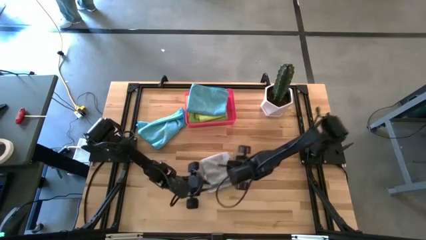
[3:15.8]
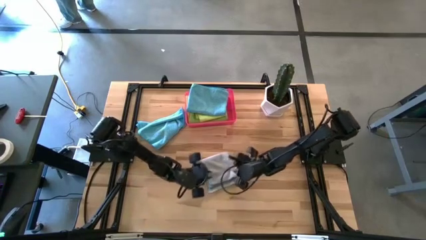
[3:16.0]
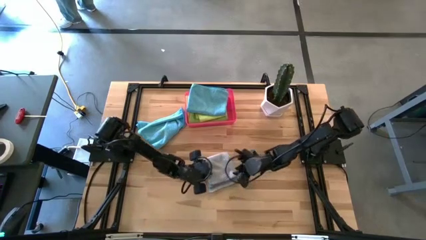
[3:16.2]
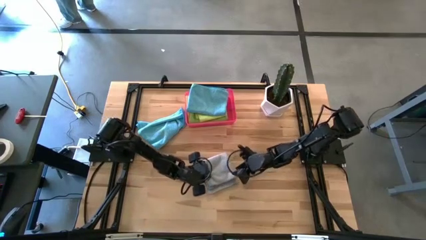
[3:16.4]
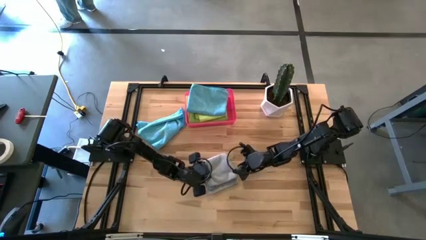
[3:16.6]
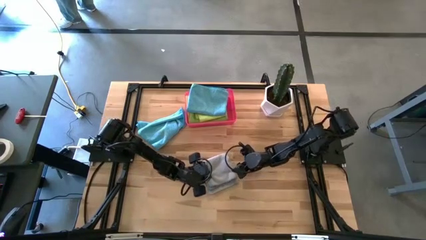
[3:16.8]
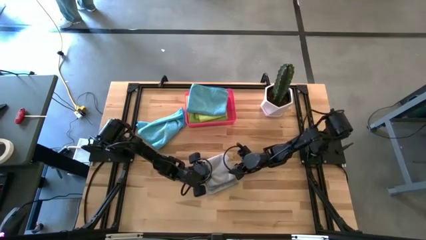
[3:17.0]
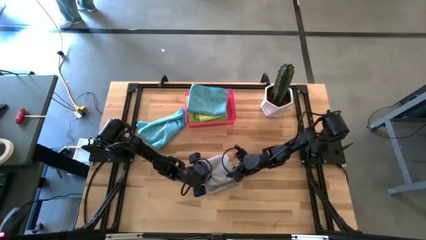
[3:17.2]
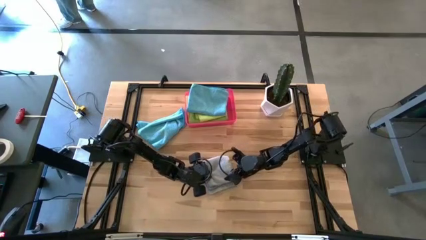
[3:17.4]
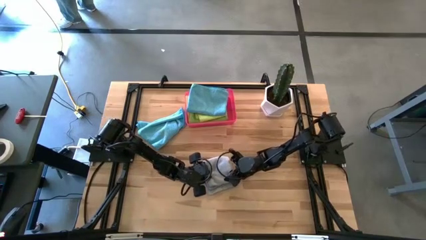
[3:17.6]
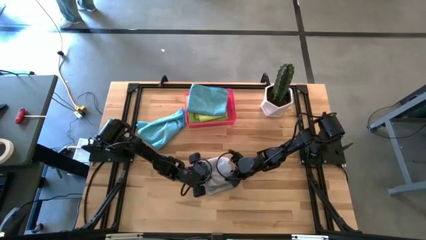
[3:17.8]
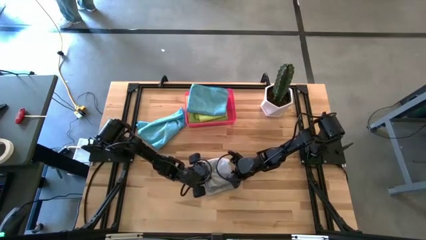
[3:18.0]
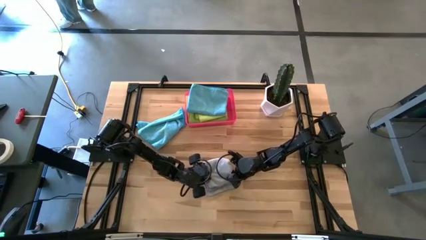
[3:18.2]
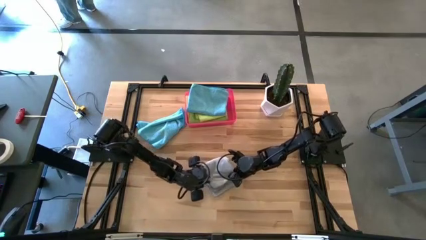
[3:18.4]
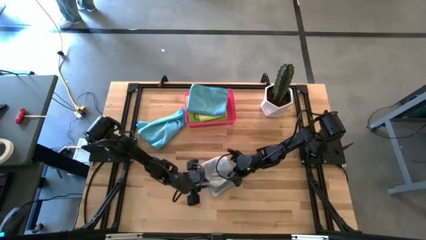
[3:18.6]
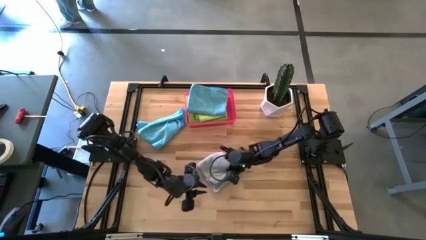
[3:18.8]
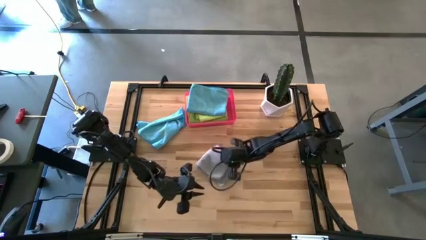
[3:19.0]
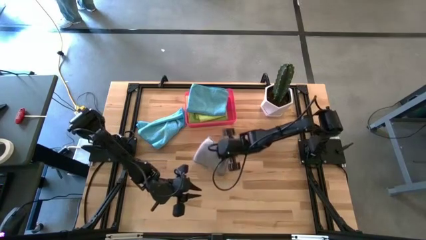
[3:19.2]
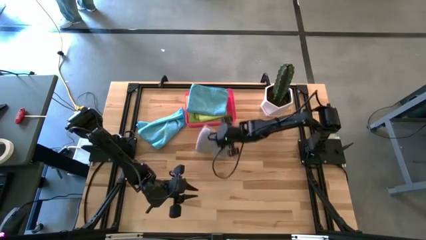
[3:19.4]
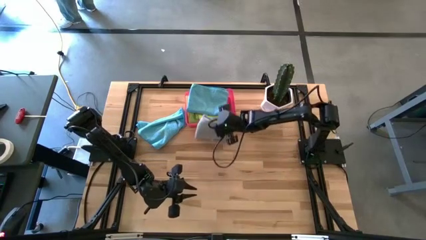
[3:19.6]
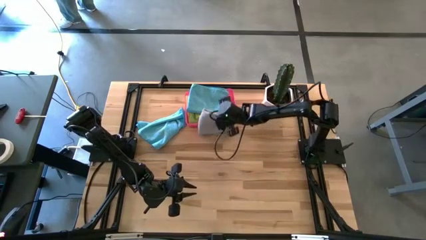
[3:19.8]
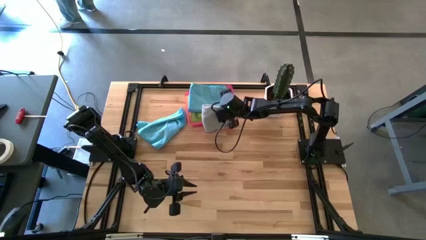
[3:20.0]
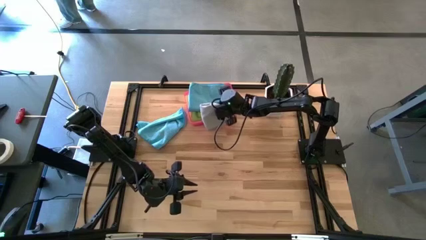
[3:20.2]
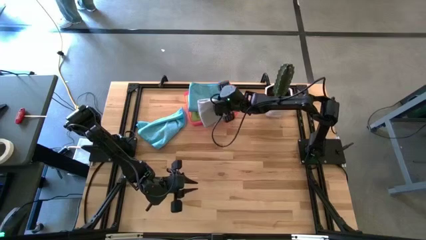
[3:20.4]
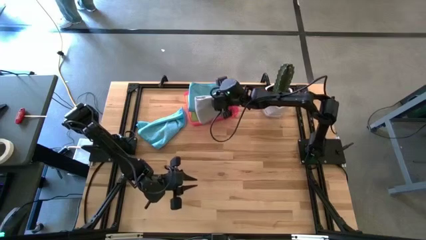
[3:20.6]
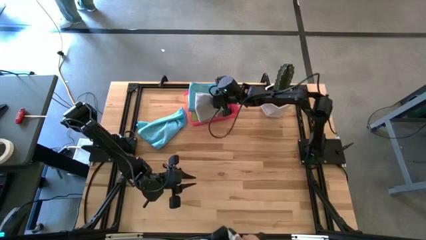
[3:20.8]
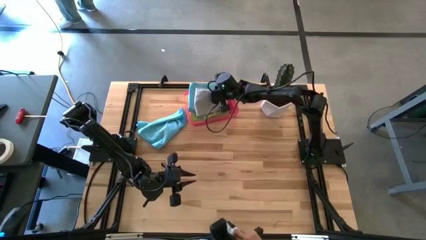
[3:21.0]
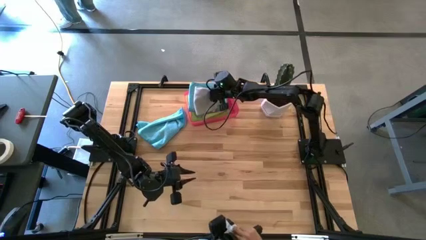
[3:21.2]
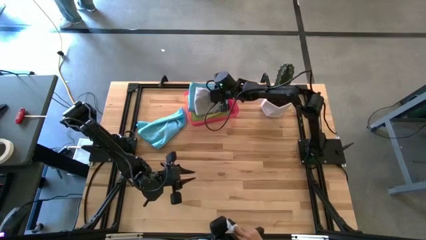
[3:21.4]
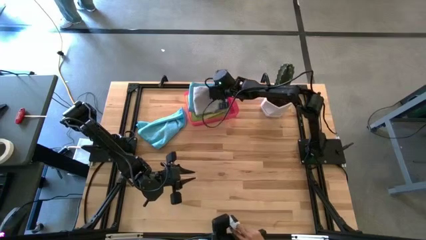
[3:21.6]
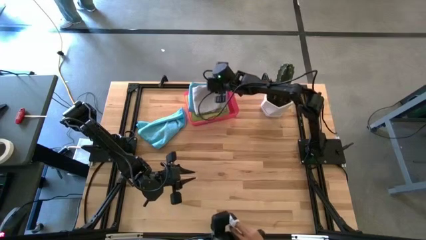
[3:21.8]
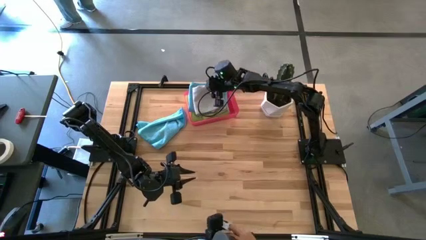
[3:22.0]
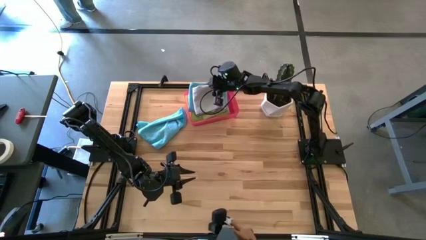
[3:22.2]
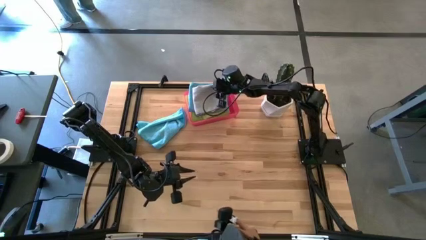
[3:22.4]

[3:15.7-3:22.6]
Task: Fold microfiber towels
Stack the folded gray microfiber cloth on top of the folded blue microfiber cloth

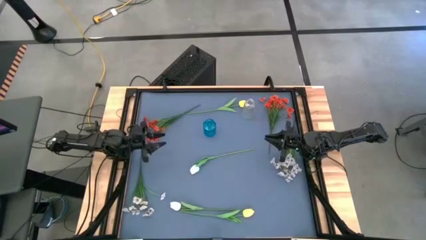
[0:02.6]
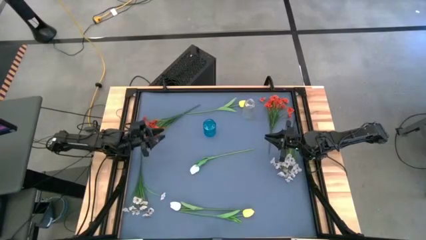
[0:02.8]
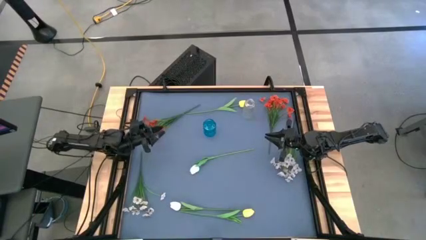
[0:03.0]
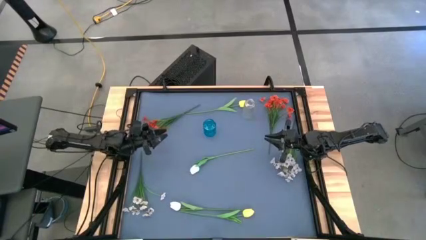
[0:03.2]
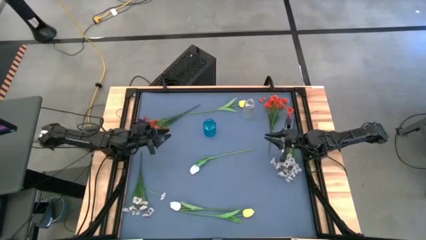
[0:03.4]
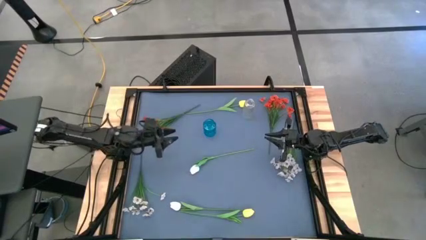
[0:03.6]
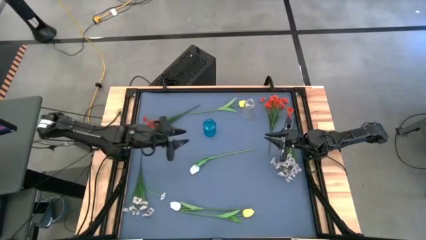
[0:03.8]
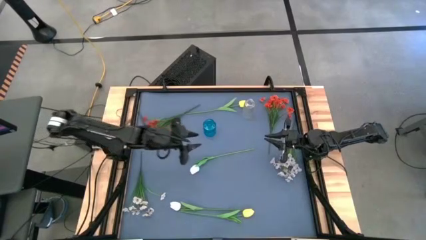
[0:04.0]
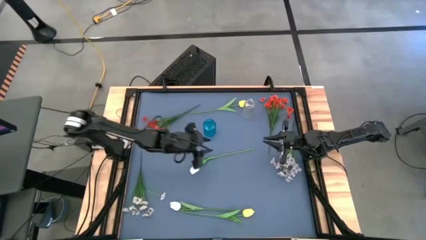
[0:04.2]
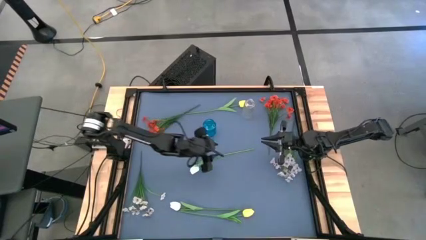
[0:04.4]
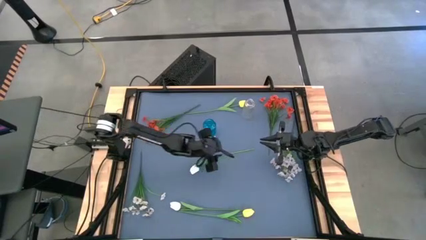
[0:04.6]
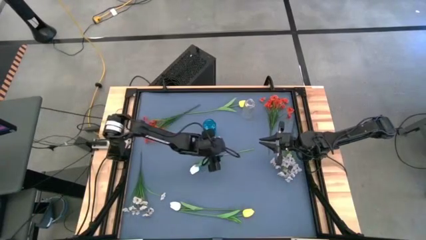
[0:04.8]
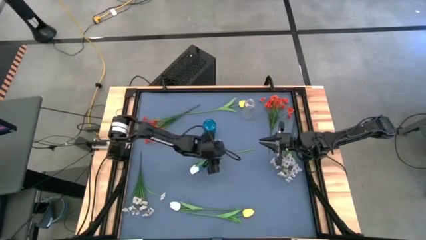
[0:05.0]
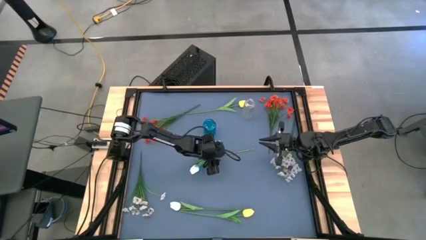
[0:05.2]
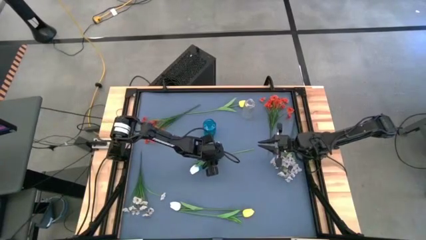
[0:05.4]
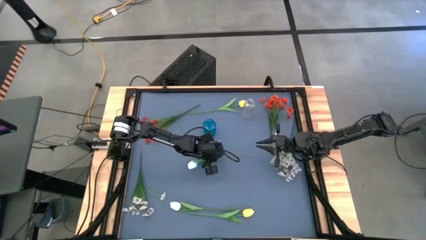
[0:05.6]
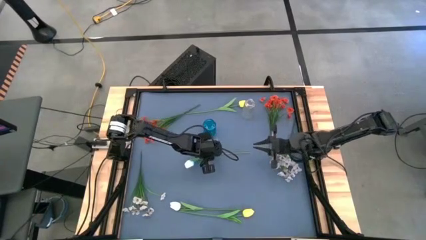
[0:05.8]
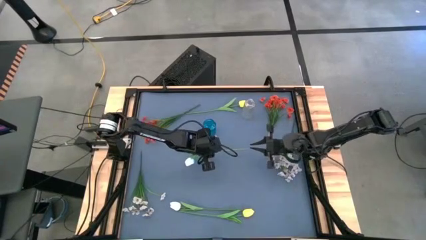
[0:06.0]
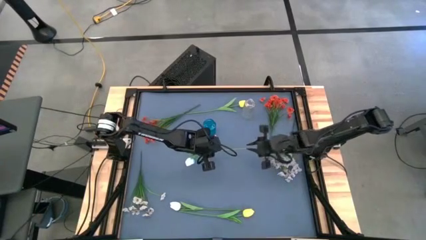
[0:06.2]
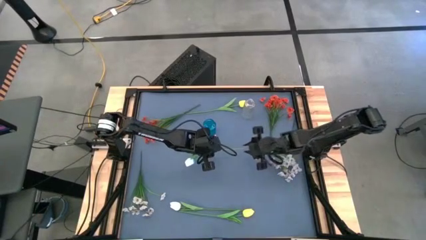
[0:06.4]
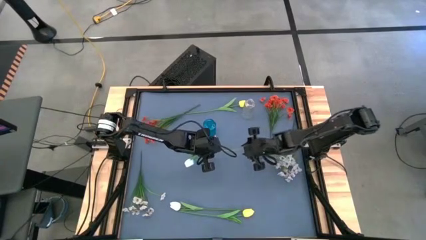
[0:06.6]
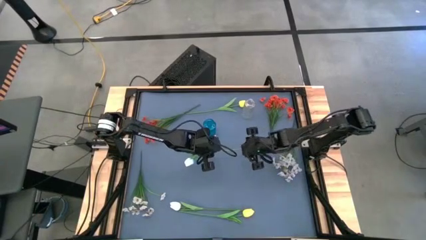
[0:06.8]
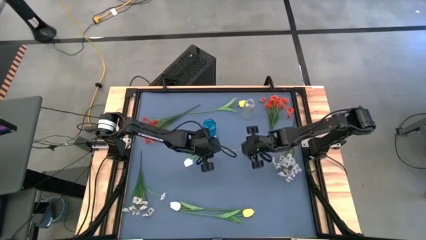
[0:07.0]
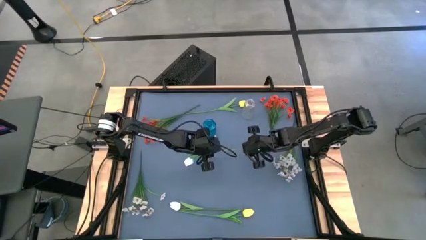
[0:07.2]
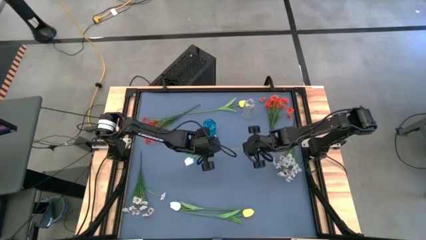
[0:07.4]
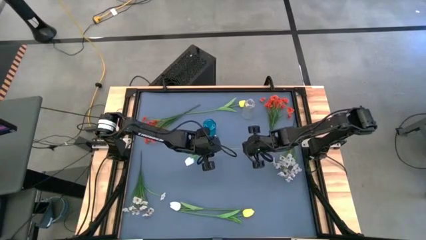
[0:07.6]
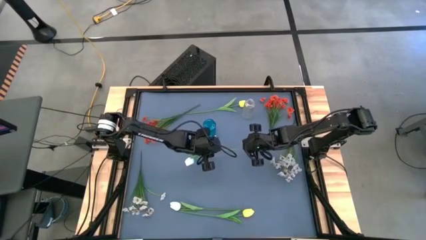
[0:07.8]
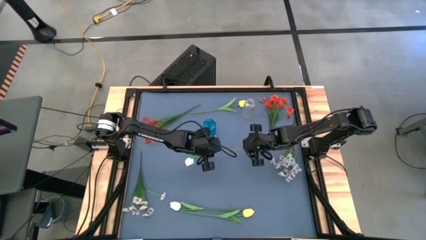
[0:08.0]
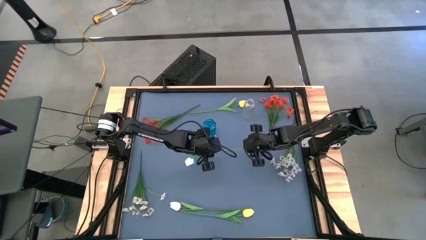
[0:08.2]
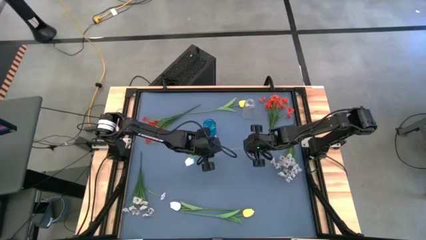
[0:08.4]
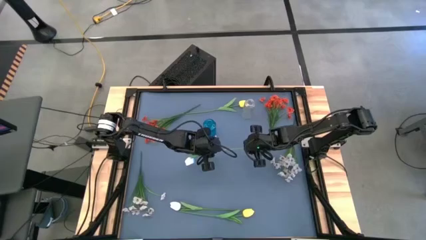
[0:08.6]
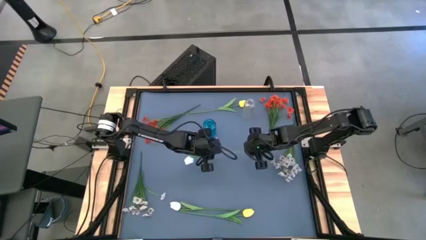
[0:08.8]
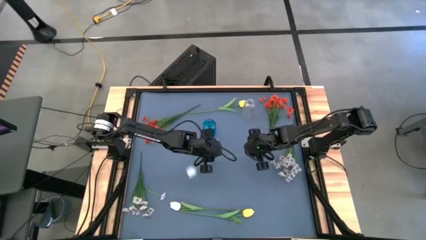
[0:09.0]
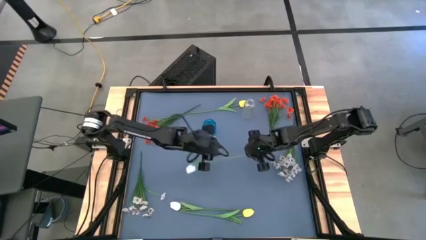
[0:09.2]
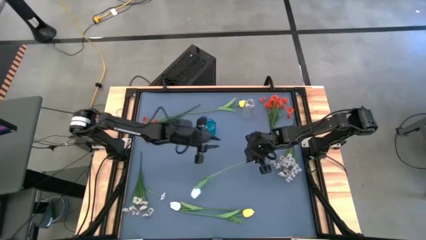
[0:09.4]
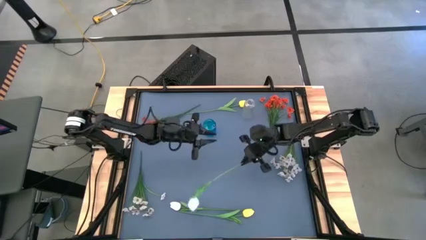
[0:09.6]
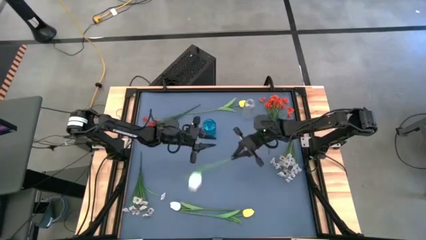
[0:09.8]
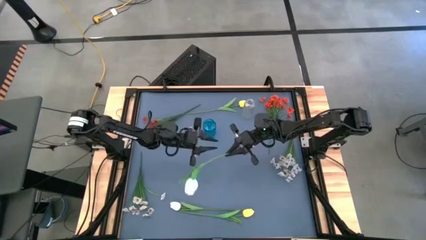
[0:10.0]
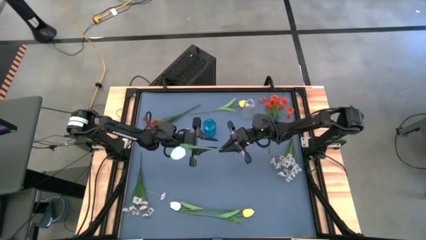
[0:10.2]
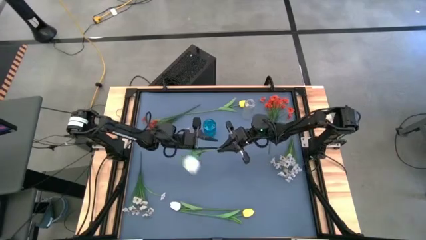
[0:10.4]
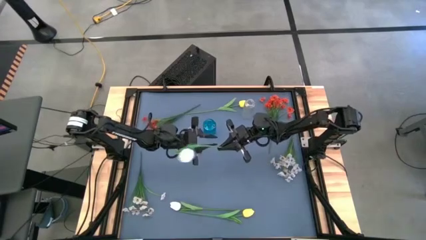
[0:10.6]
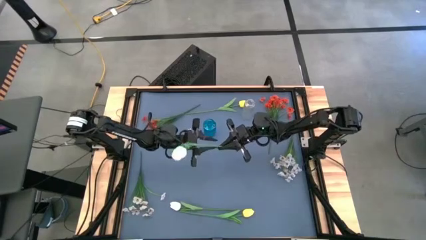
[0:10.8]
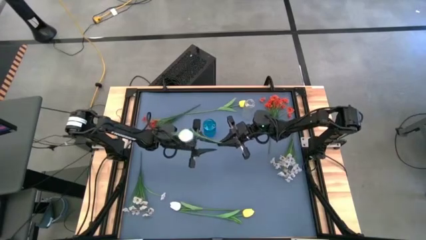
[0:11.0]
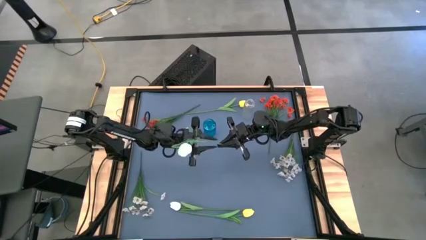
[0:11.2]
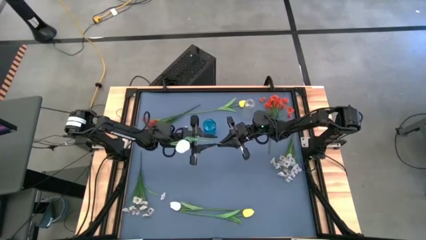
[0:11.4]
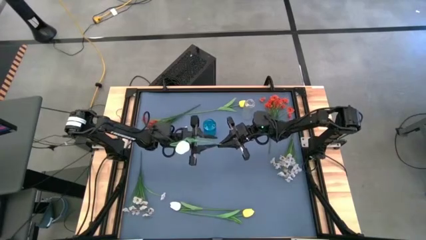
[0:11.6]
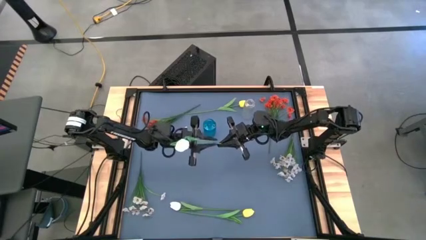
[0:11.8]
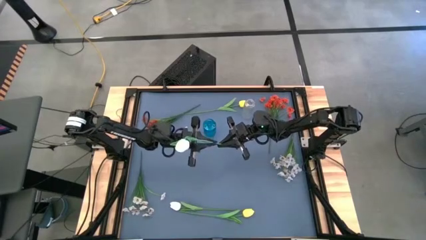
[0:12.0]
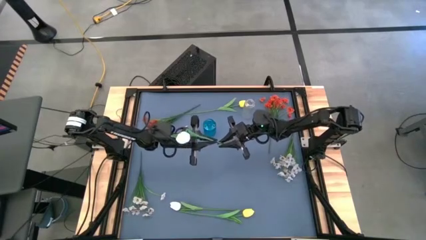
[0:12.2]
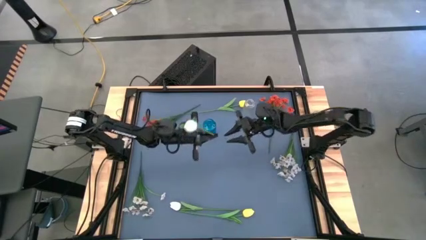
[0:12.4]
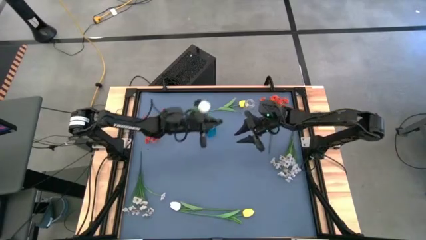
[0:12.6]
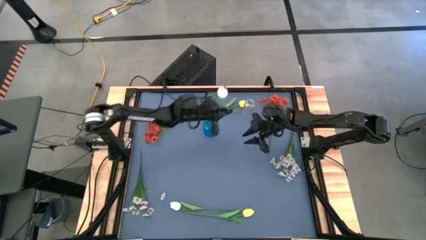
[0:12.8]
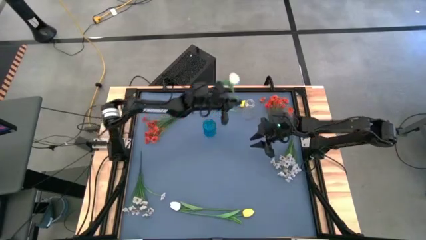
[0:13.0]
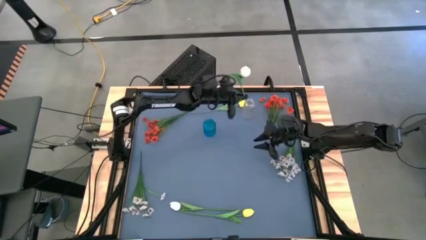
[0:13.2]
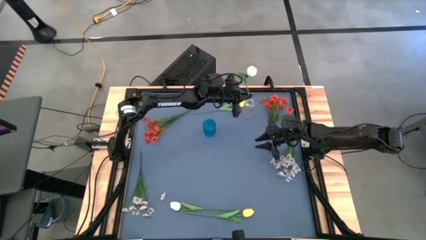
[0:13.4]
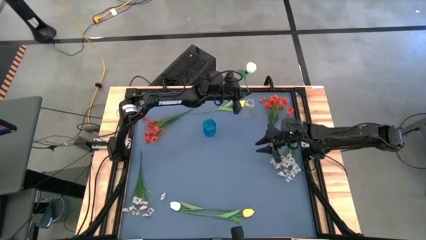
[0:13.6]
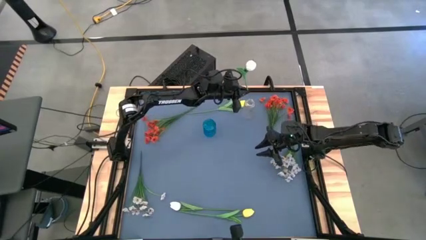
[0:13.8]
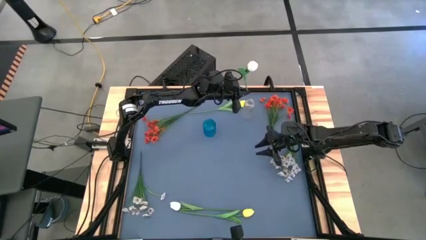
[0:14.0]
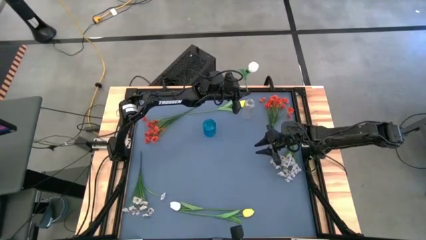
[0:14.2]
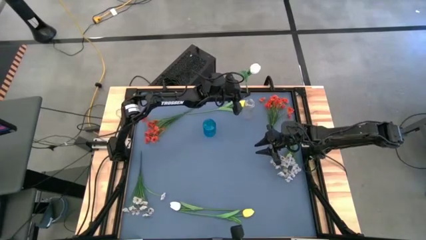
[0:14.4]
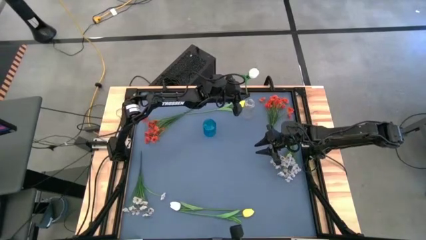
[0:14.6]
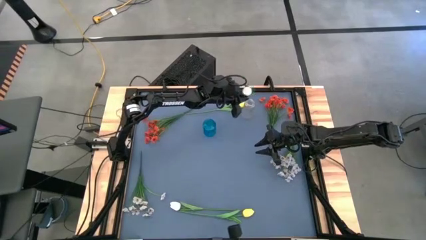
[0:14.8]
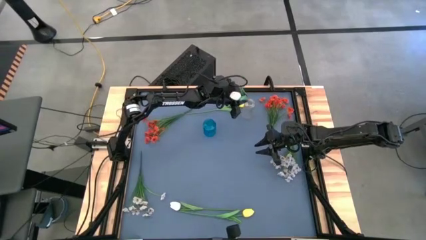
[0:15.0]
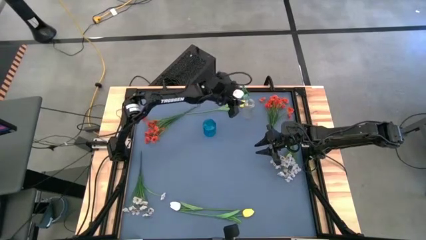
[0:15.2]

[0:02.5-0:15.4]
Task: Sort flowers into vase by color
Put the top white tulip into the transparent vase
